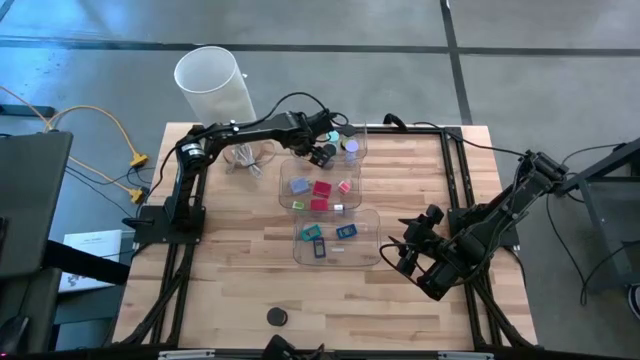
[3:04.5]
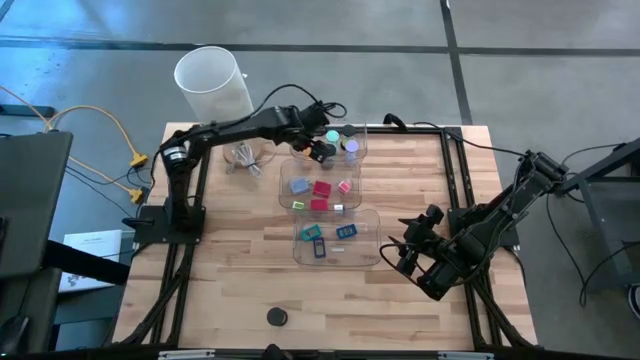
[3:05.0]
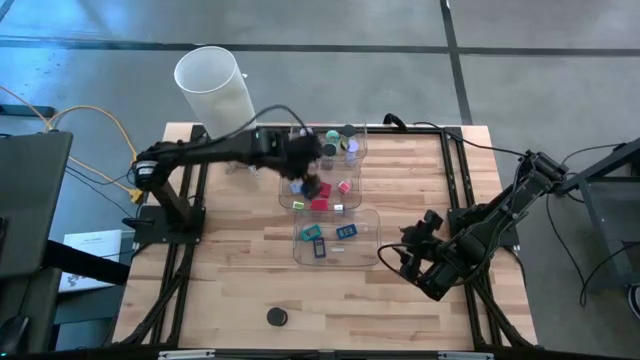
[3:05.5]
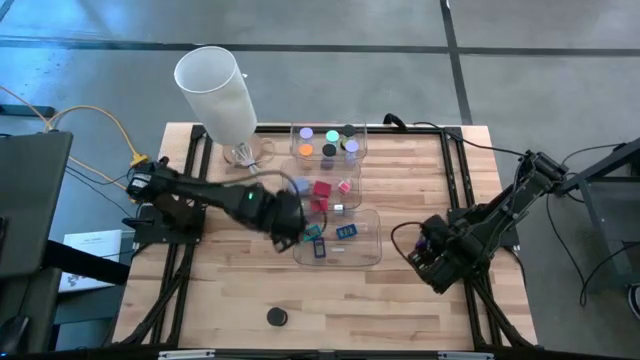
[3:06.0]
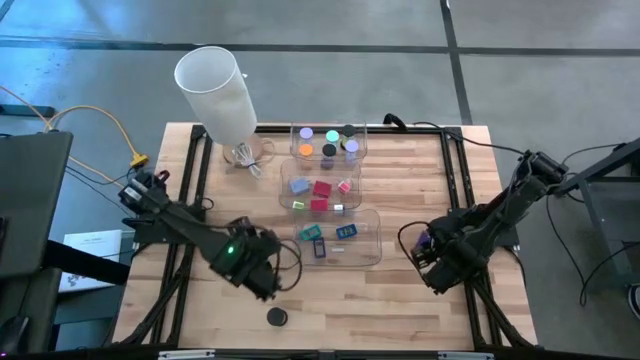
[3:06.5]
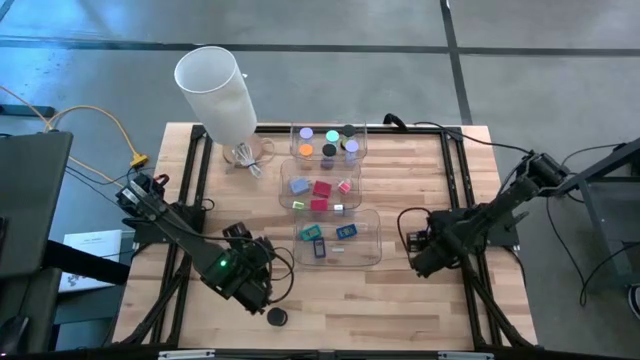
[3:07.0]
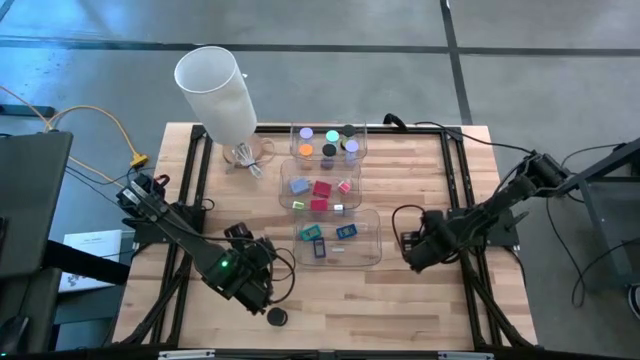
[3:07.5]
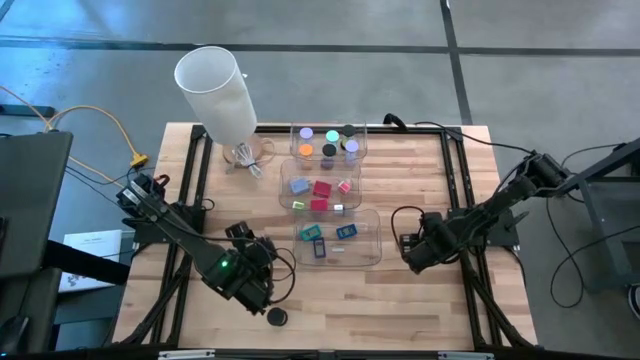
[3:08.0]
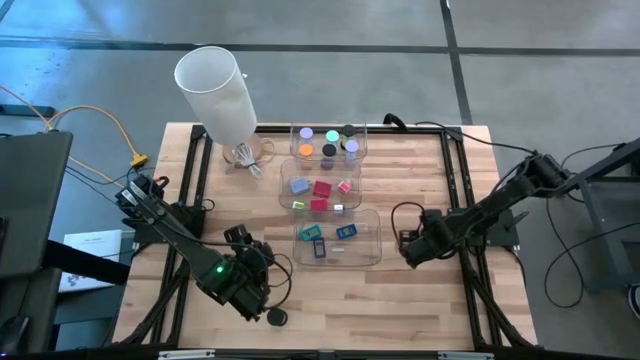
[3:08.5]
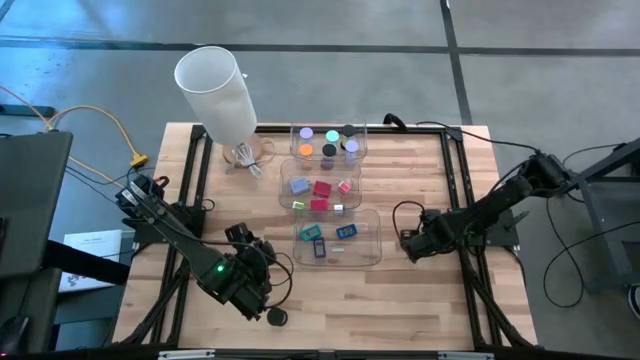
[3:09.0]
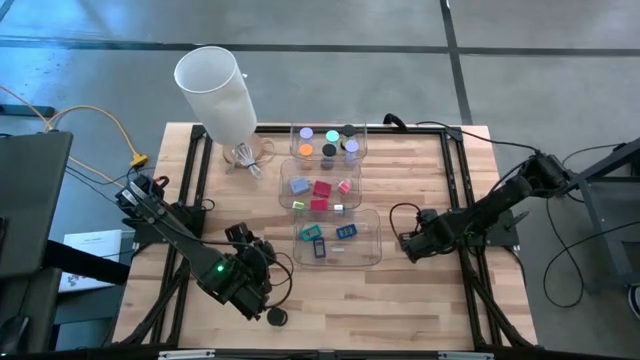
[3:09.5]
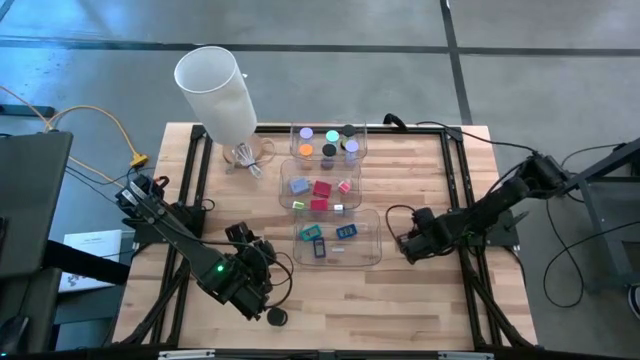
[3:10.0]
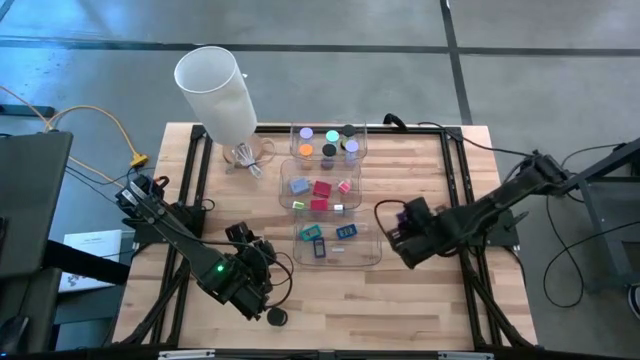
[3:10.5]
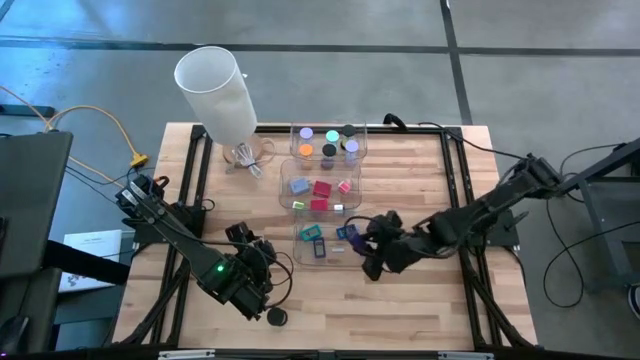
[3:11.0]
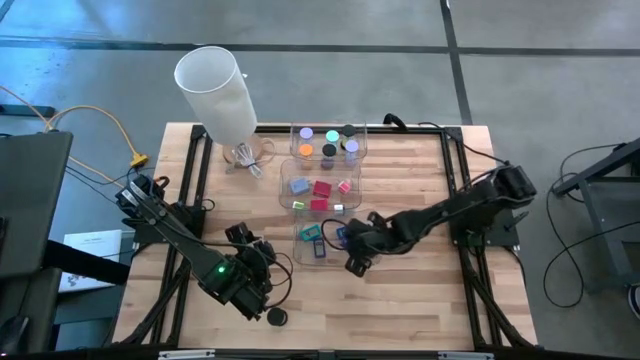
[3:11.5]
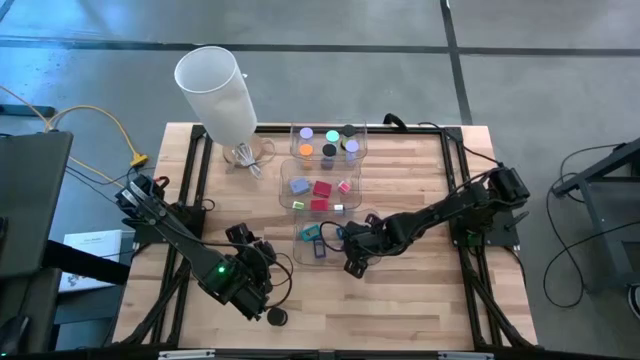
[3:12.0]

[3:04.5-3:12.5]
Task: Pick & Place Office items
Put the dark blue digital timer into the middle transparent bin

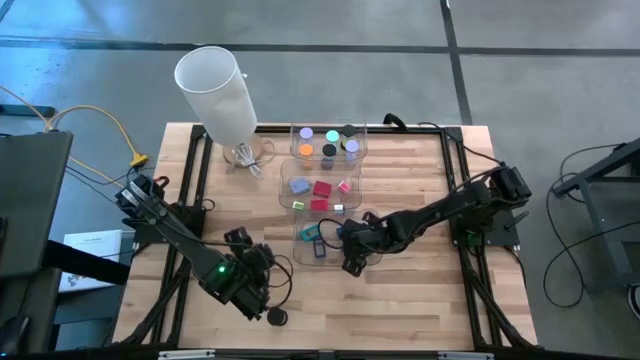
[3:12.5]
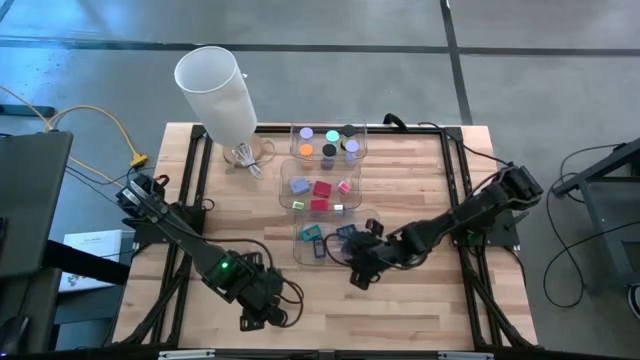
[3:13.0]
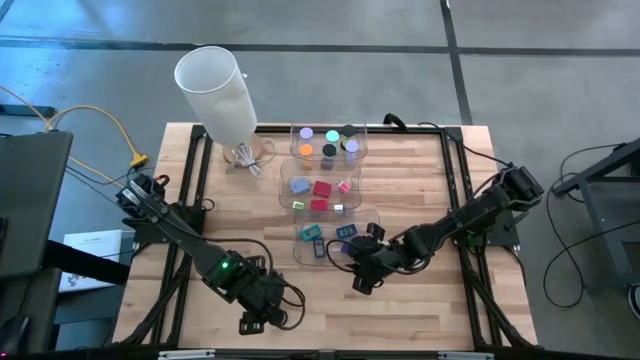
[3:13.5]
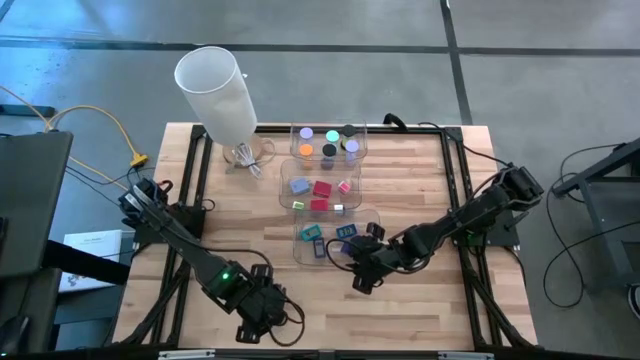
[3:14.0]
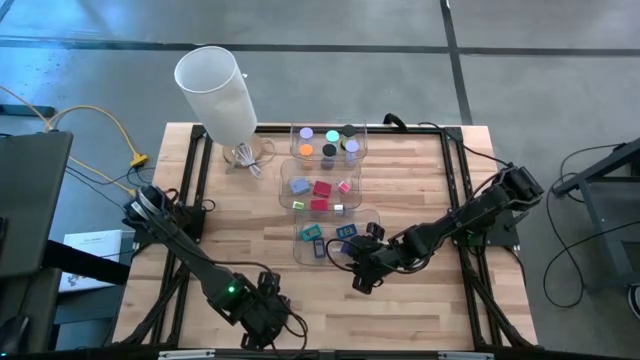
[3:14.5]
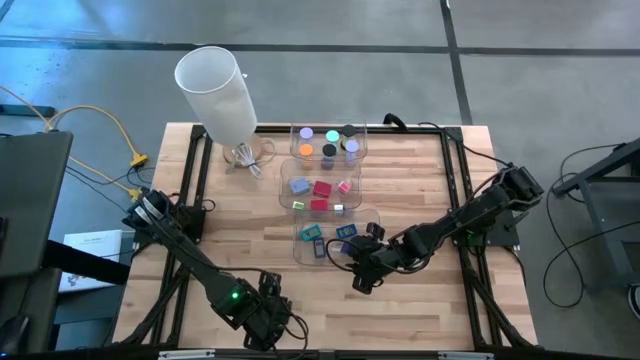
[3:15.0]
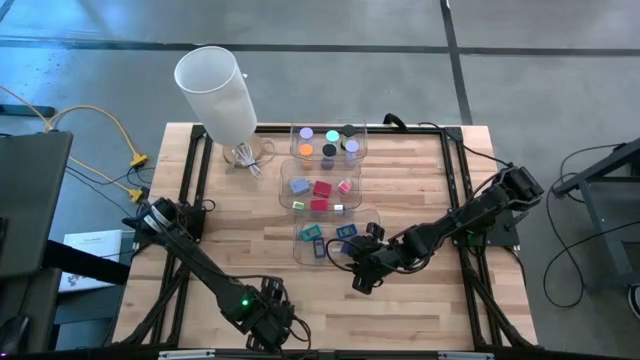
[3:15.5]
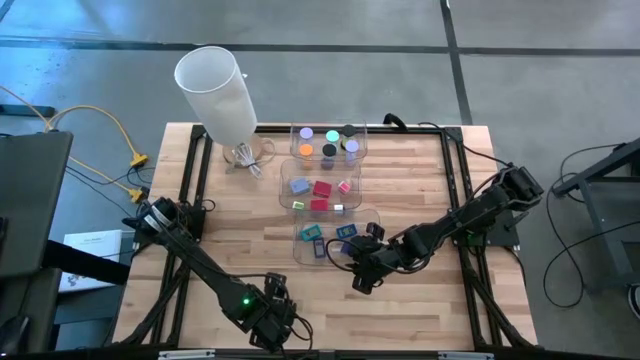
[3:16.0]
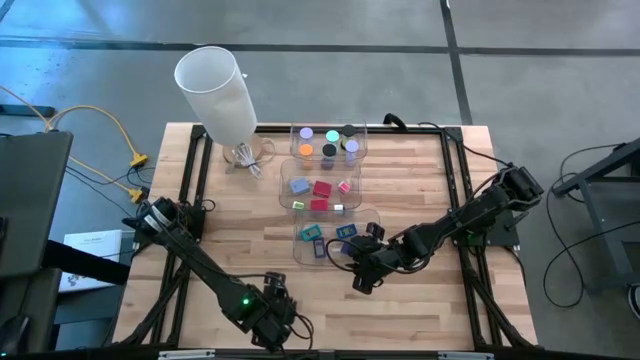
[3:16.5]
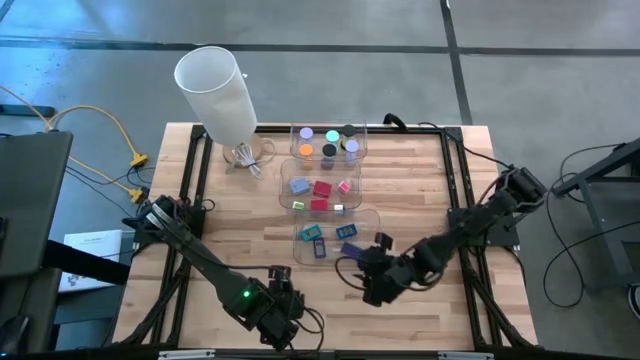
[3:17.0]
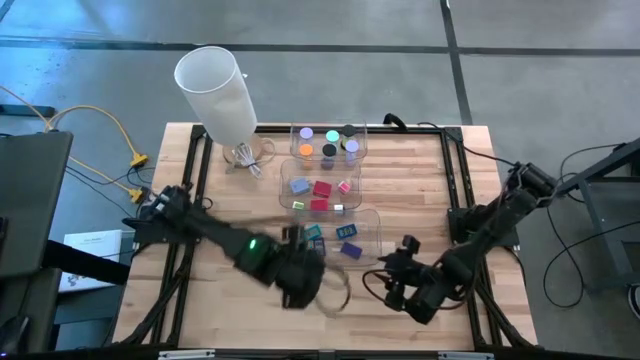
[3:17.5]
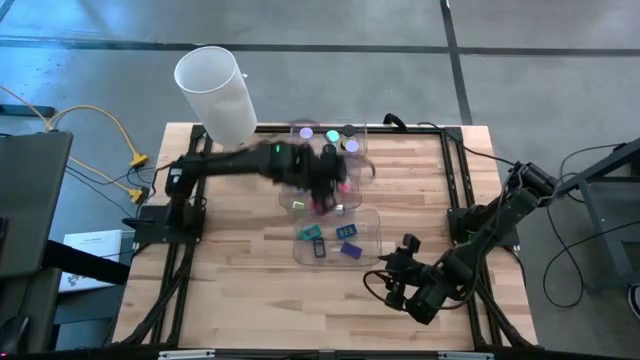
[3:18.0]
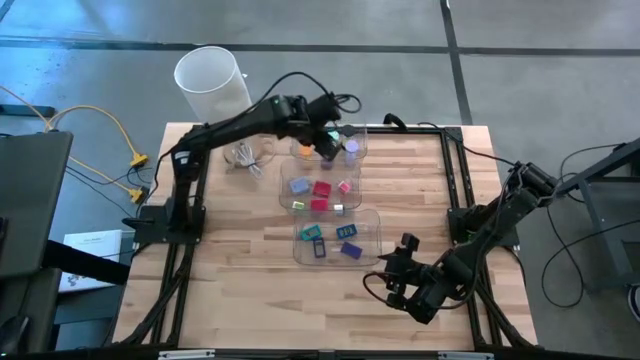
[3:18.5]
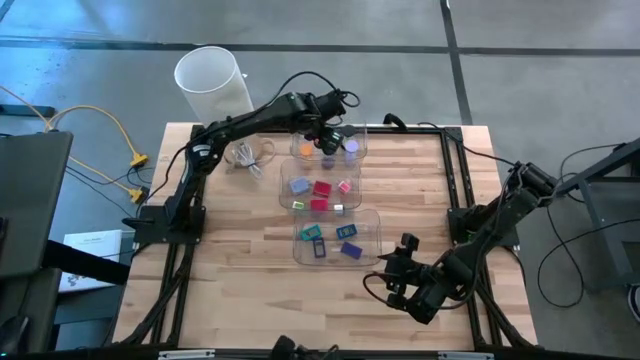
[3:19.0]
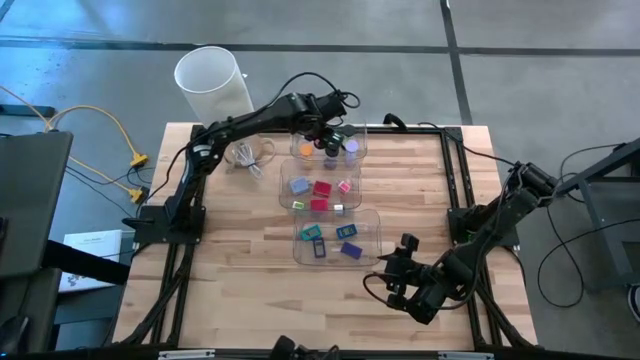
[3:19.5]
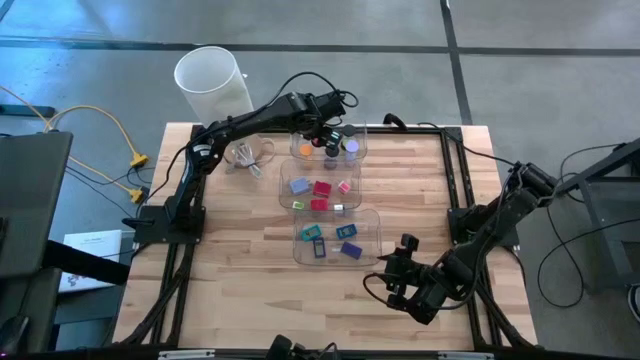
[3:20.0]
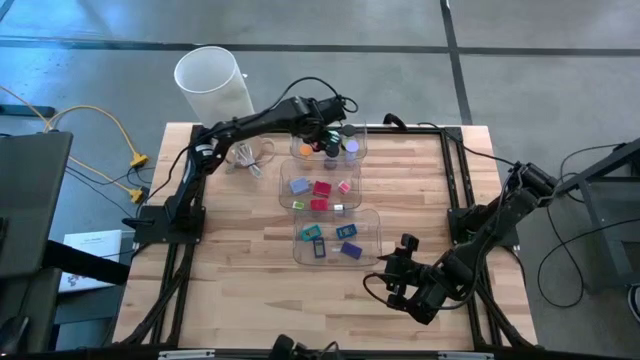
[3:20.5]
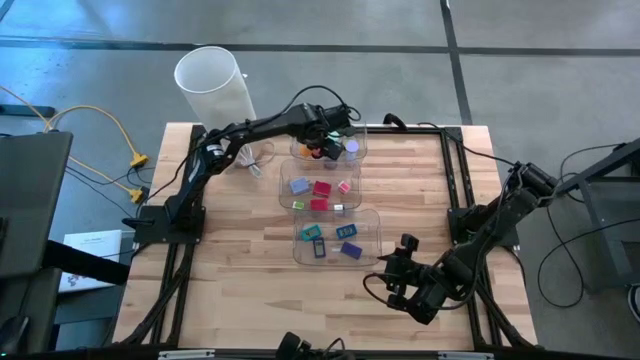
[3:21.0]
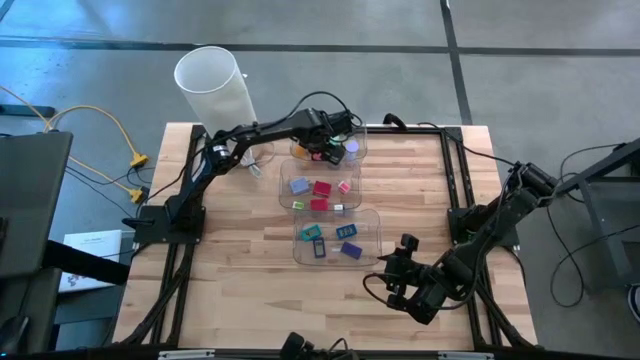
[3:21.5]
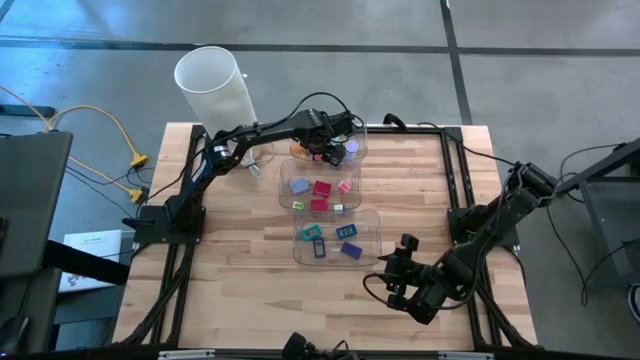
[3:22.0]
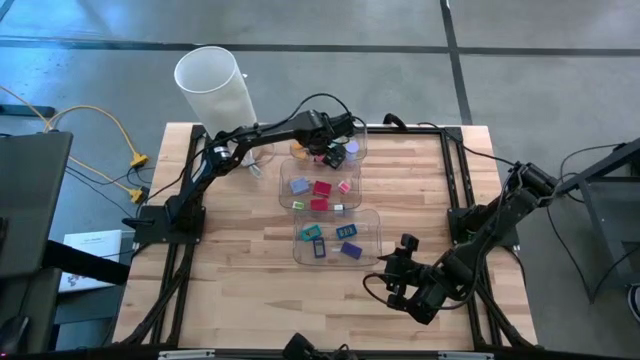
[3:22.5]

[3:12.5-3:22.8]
Put the pink hourglass into the top transparent bin

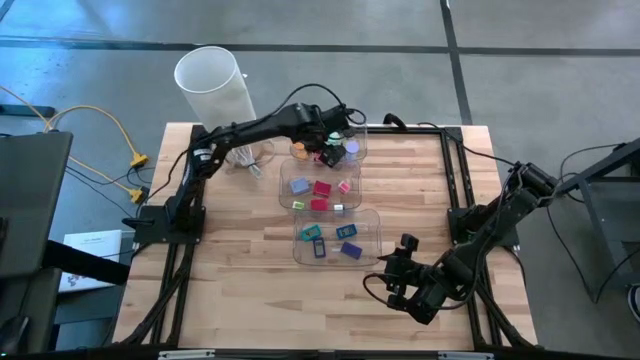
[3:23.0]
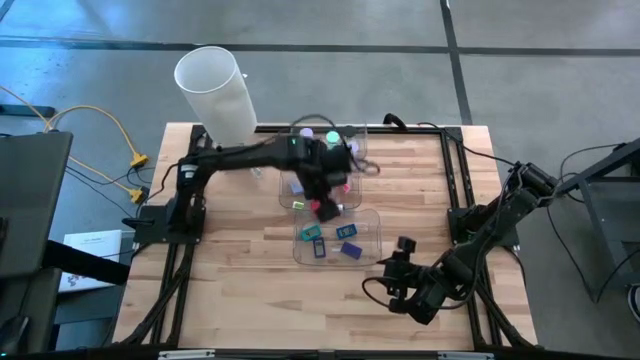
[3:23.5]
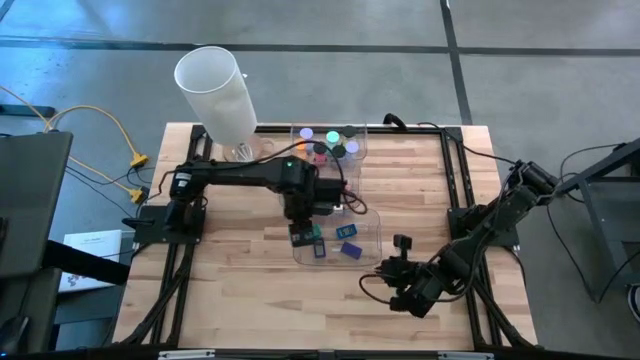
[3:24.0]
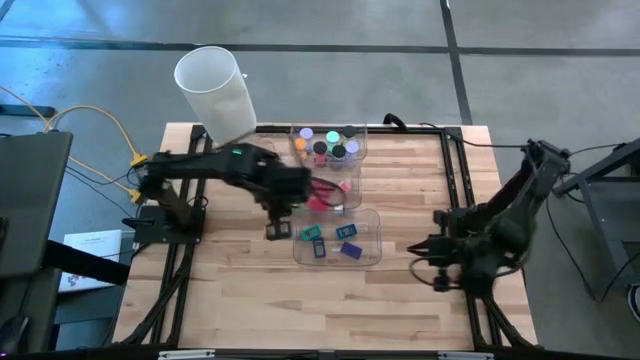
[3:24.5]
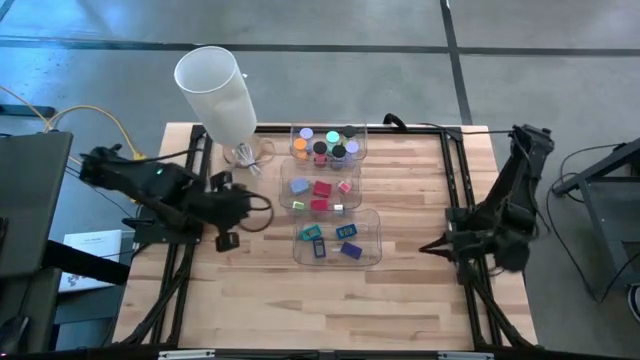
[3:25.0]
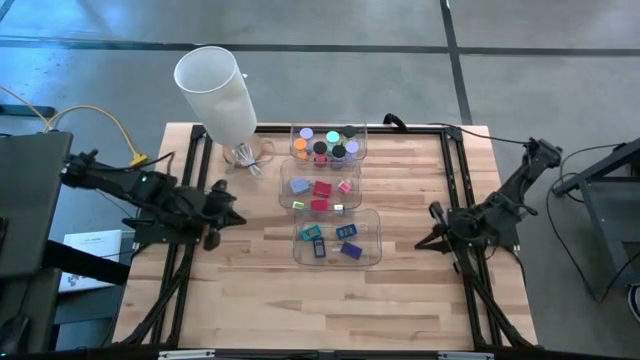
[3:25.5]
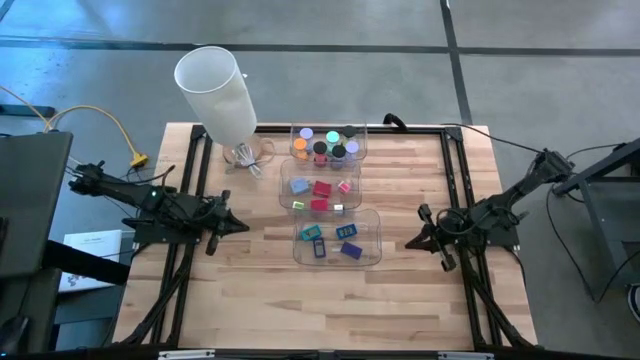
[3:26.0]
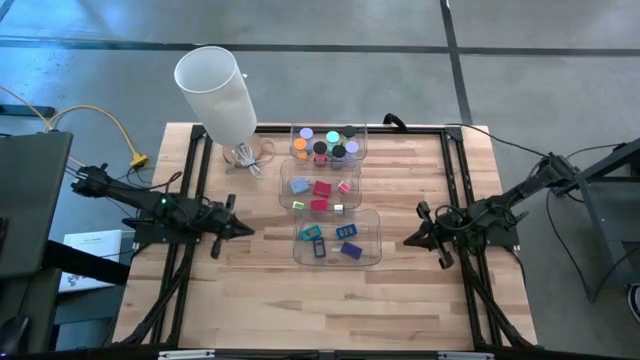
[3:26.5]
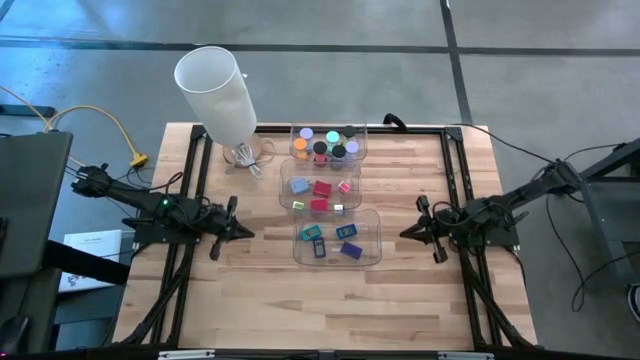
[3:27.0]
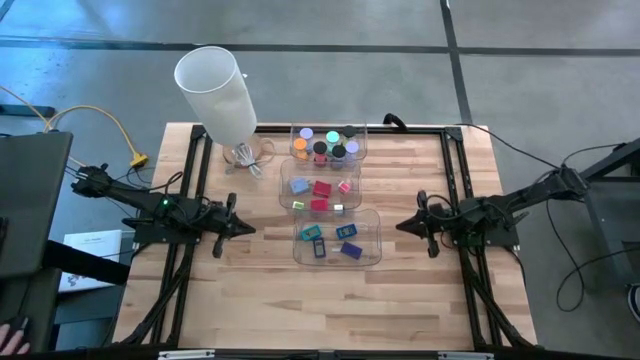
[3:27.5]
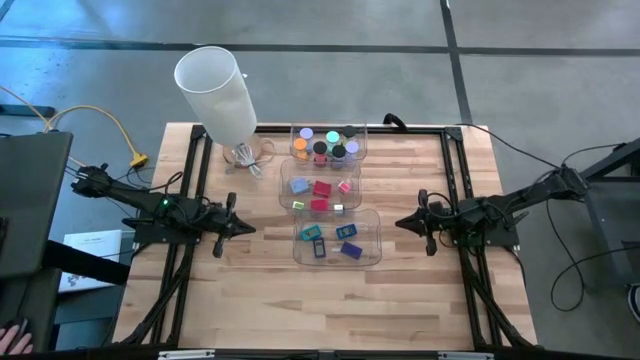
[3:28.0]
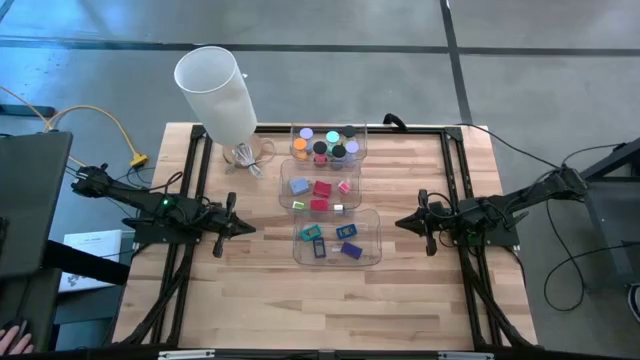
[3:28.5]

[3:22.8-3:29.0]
Return to Home Position
